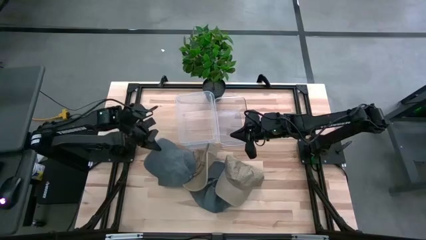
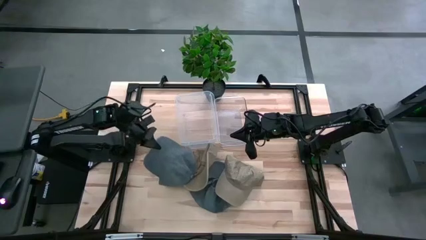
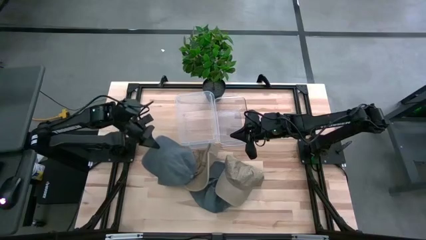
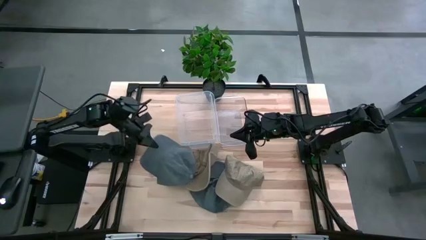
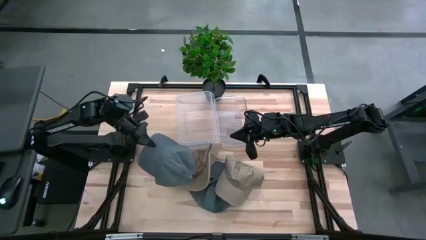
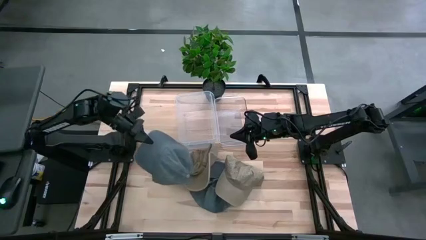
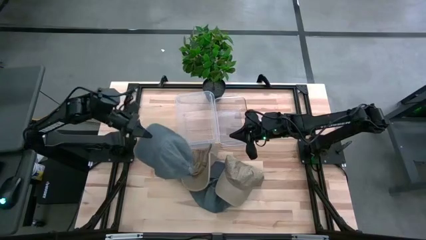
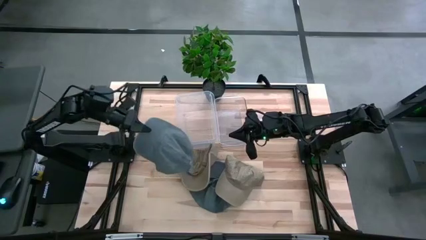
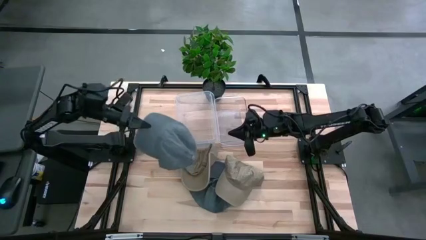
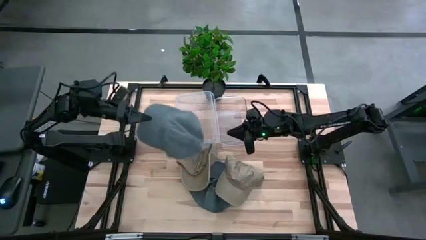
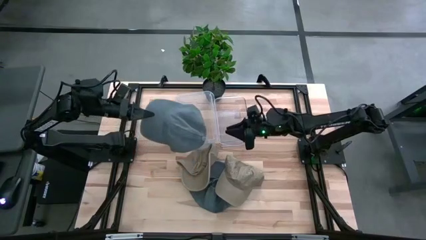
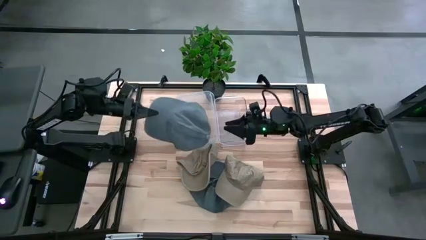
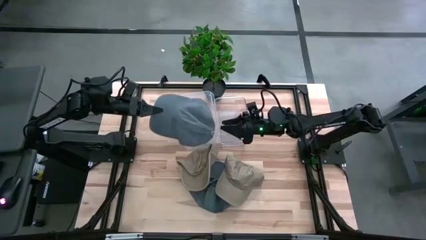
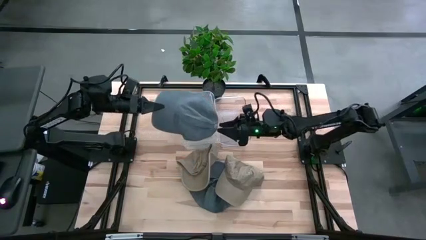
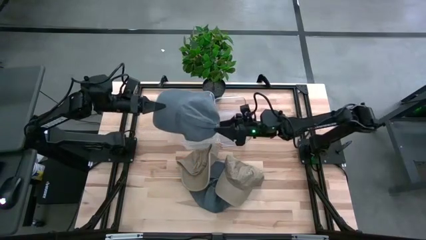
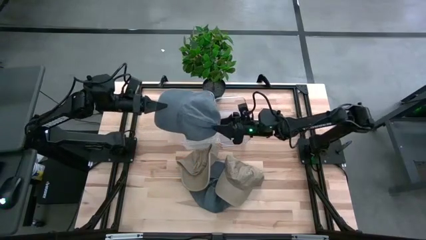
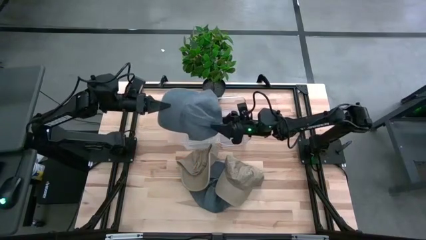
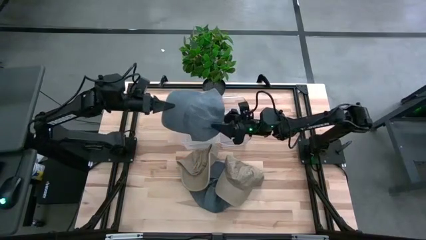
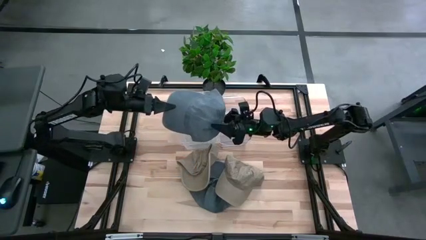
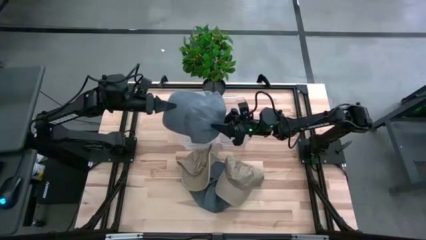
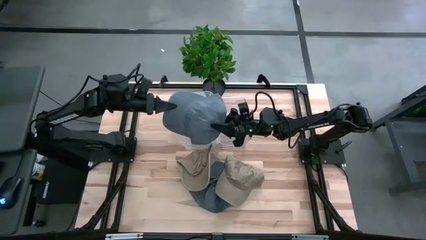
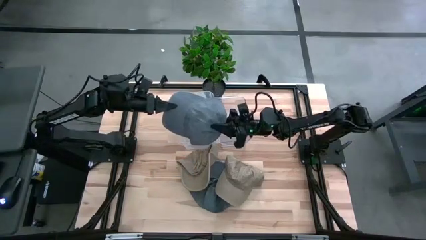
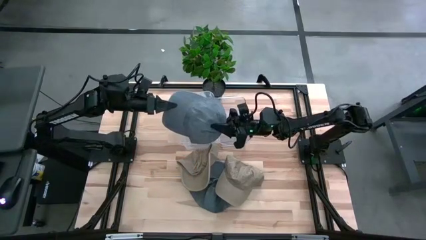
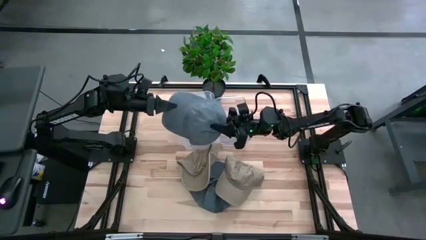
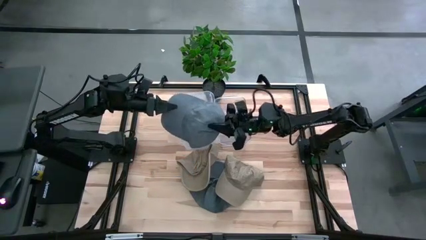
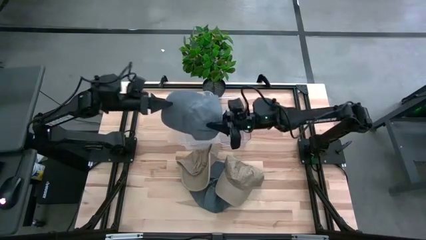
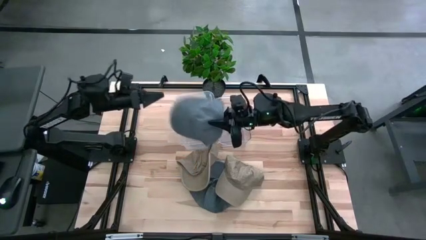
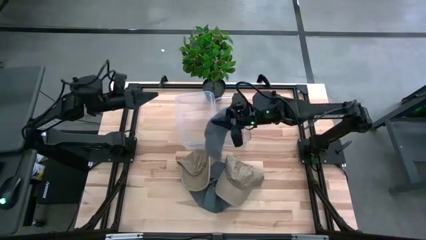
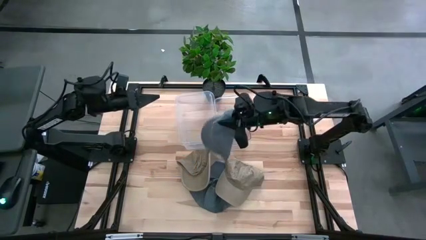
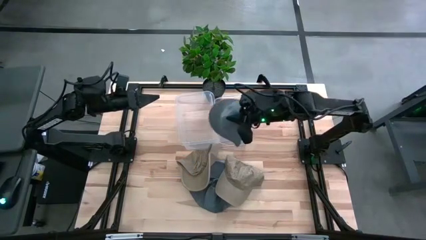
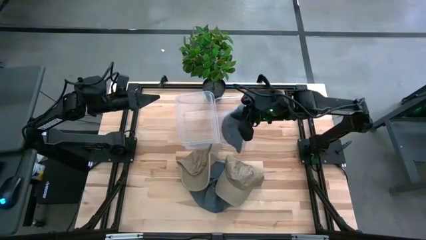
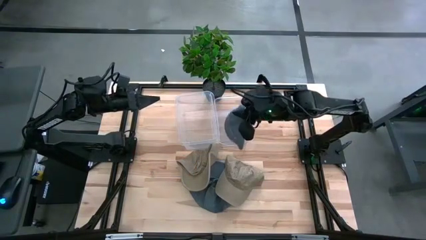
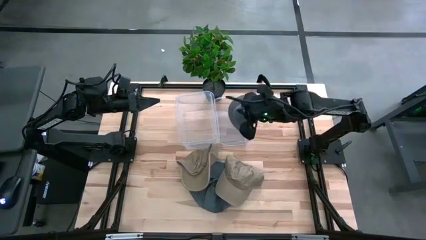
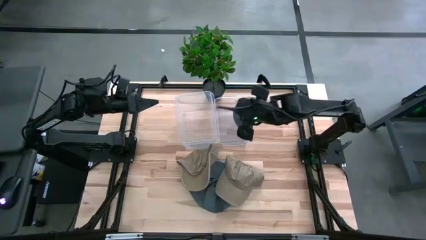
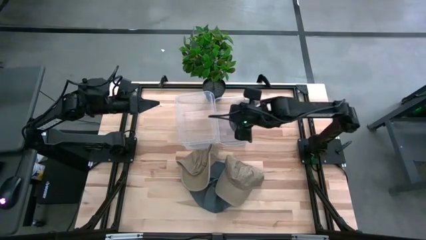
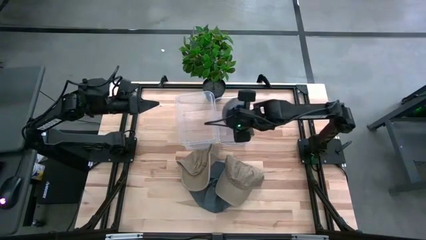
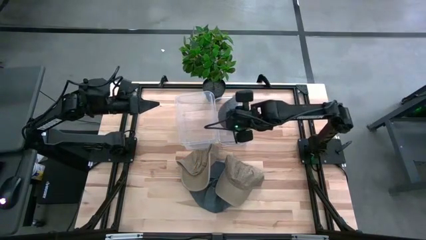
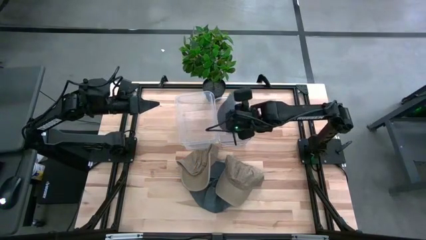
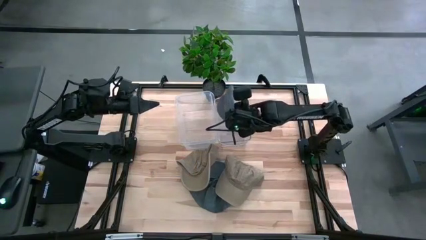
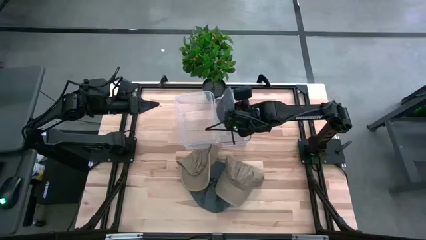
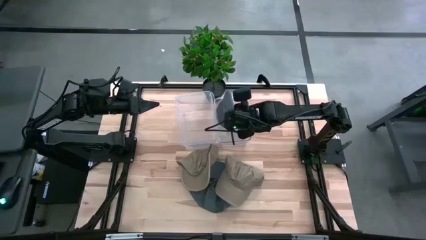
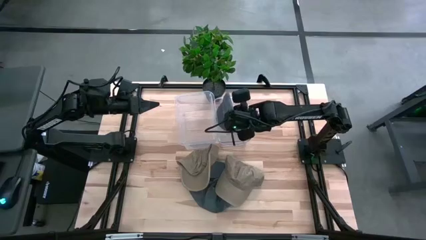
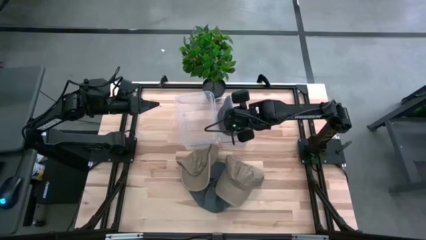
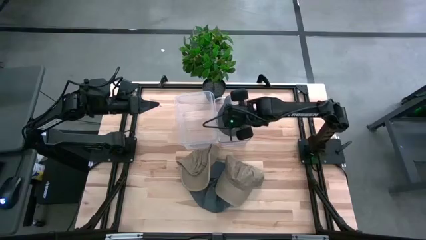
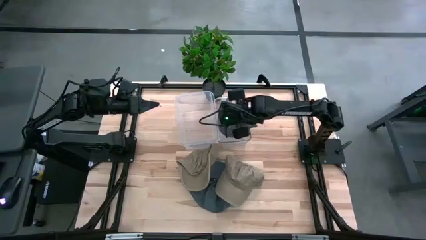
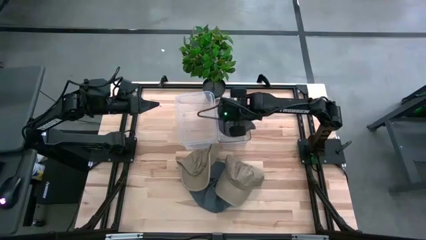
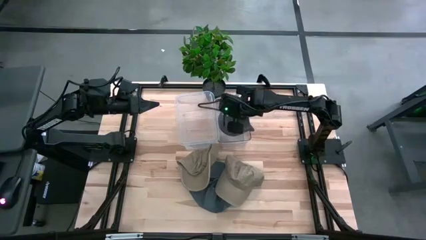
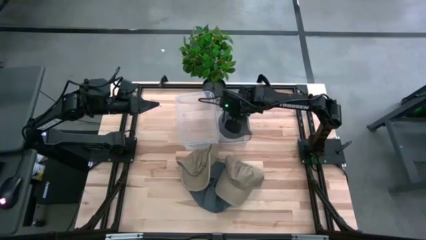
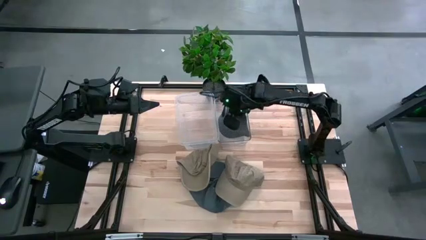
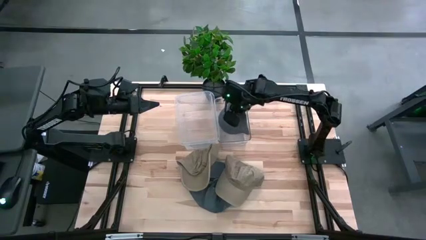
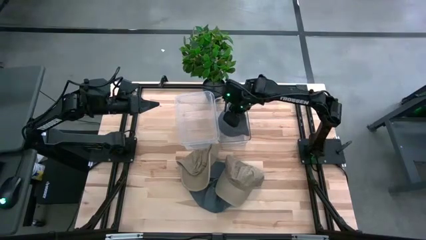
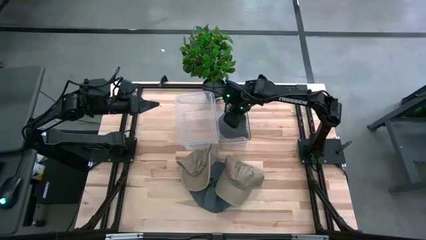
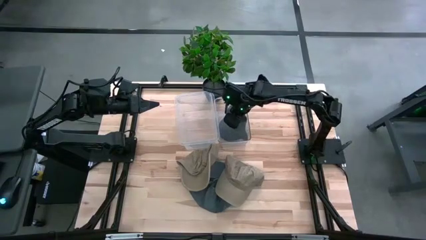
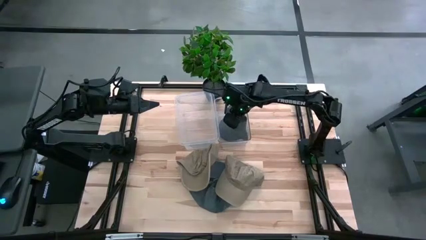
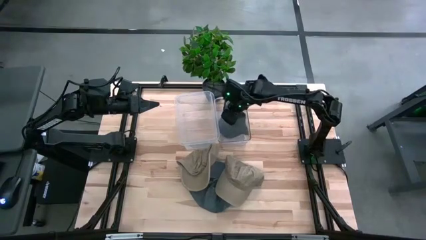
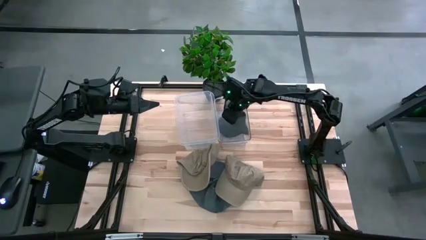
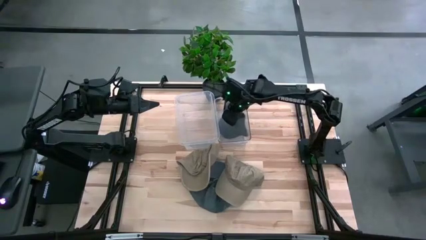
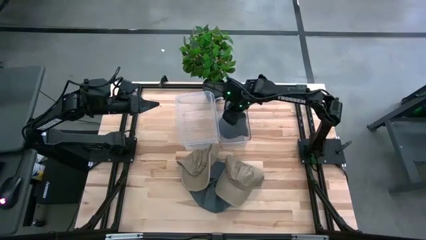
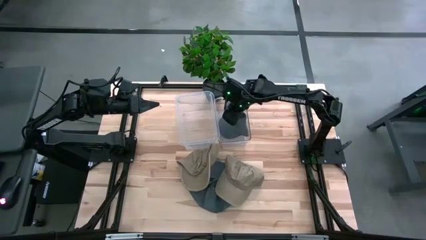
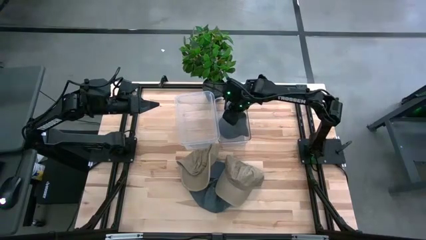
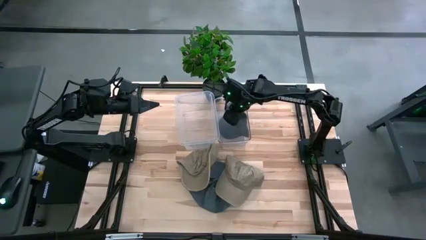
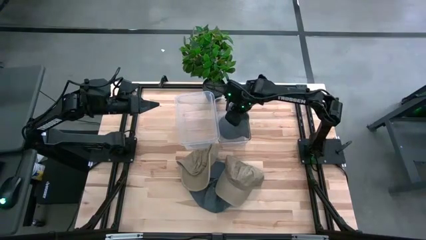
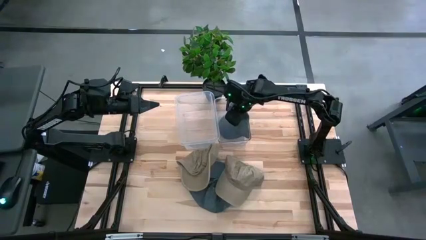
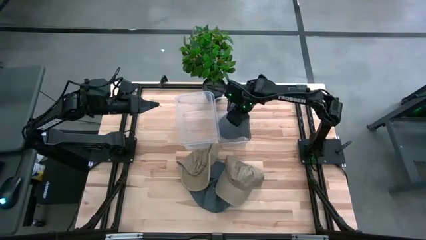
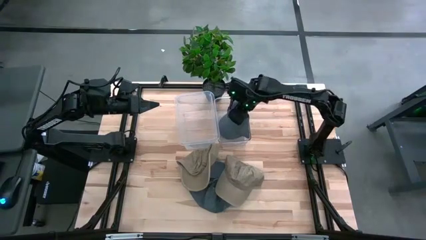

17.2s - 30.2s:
Task: Pick & Place hat
Put the top gray cap into the right transparent bin
